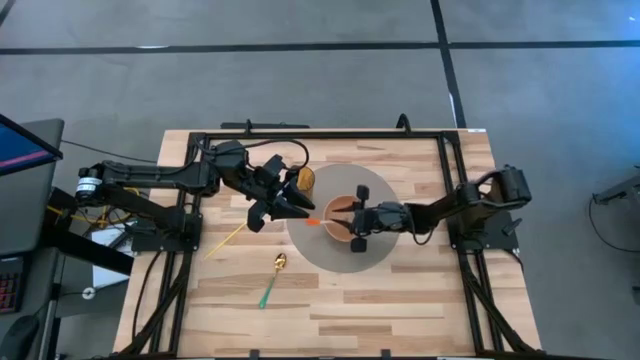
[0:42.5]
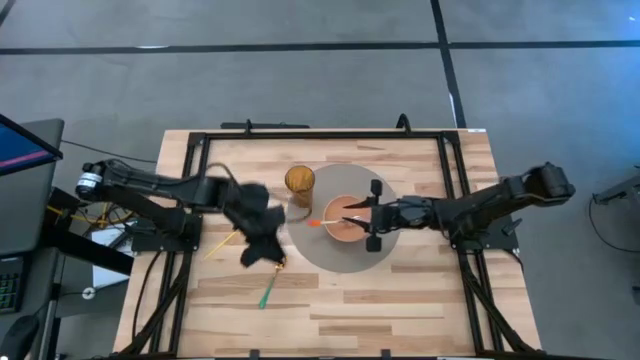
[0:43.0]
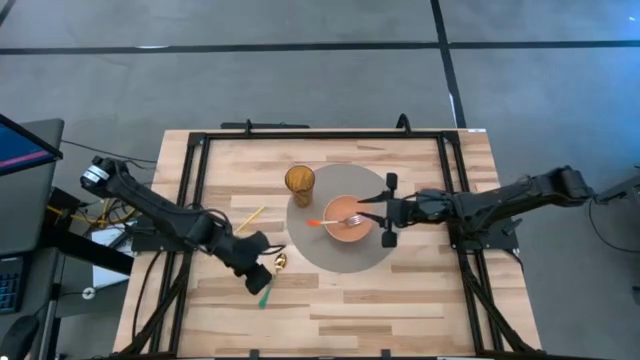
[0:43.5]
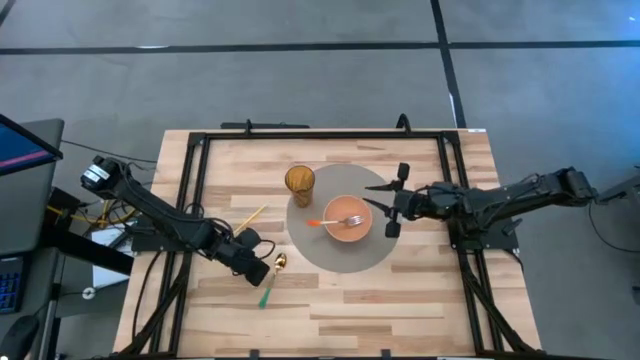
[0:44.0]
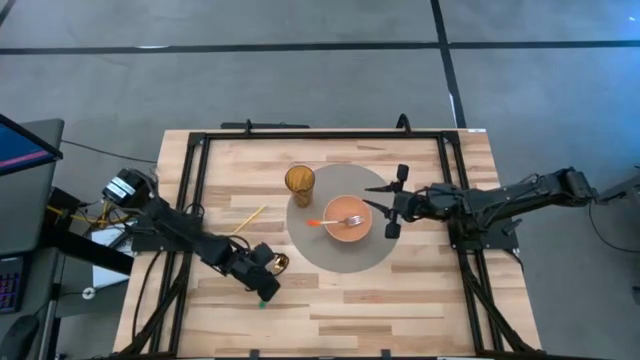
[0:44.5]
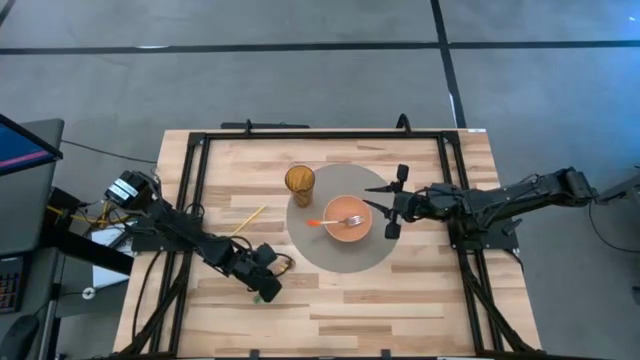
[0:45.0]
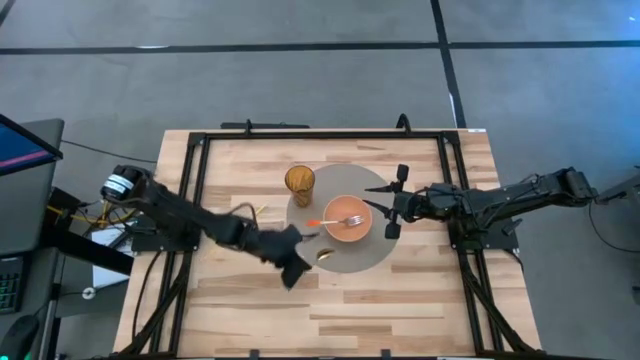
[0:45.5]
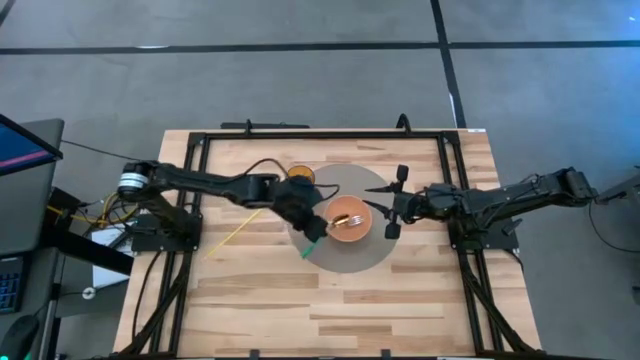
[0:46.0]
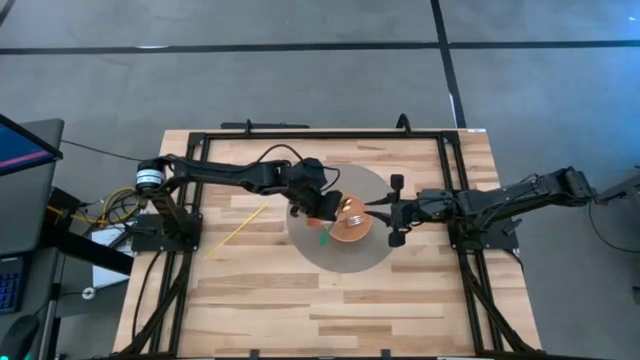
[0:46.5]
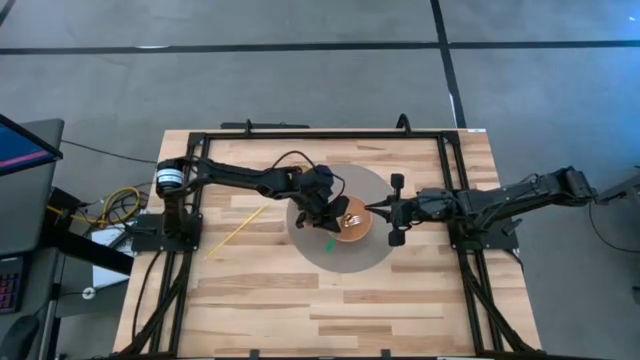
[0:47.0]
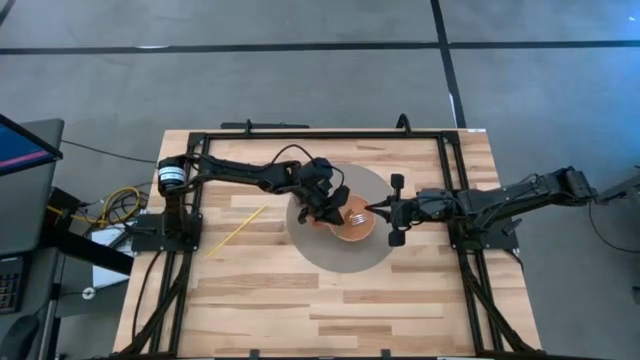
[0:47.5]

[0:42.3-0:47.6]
Task: Pick & Place Utensil
Put the green gold spoon into the light pink bowl

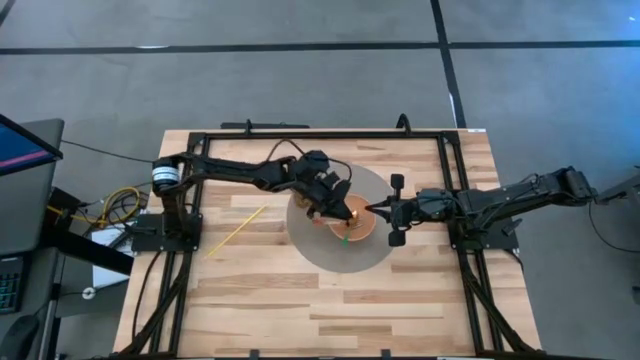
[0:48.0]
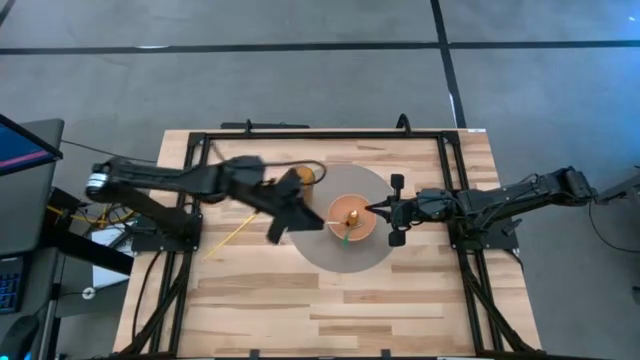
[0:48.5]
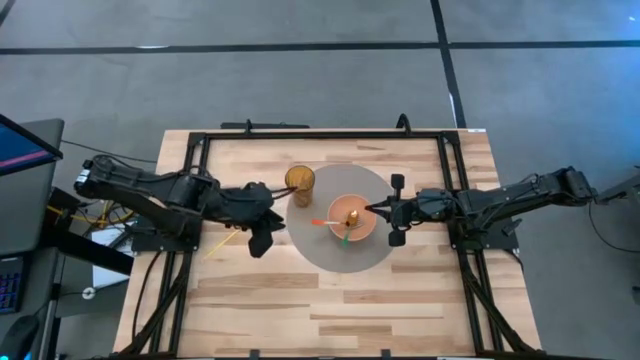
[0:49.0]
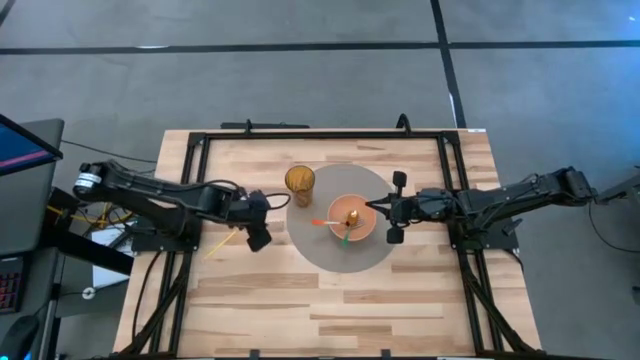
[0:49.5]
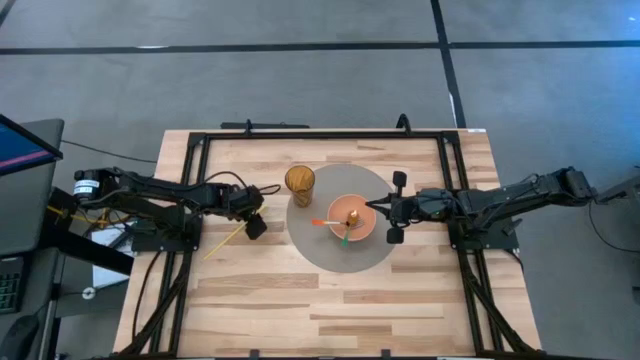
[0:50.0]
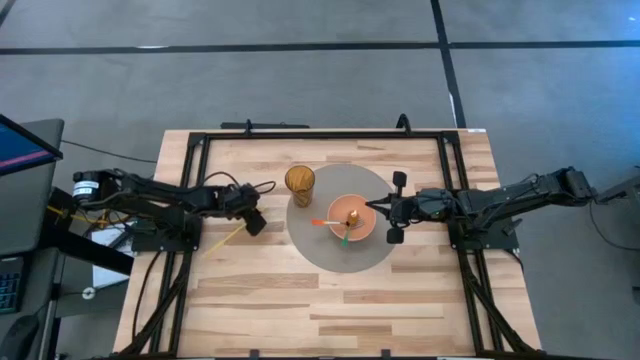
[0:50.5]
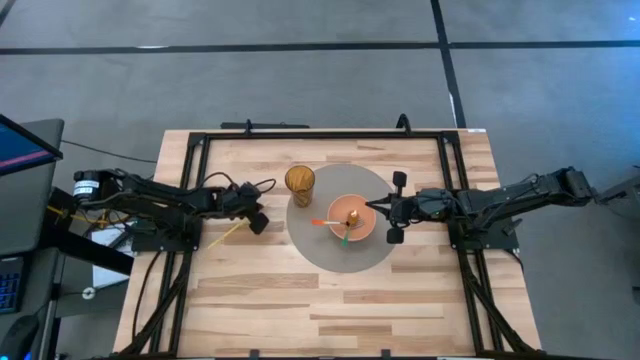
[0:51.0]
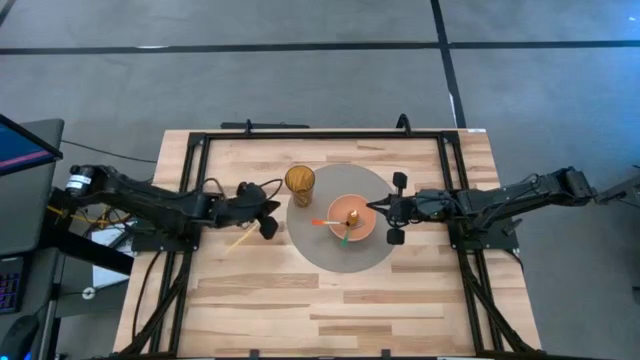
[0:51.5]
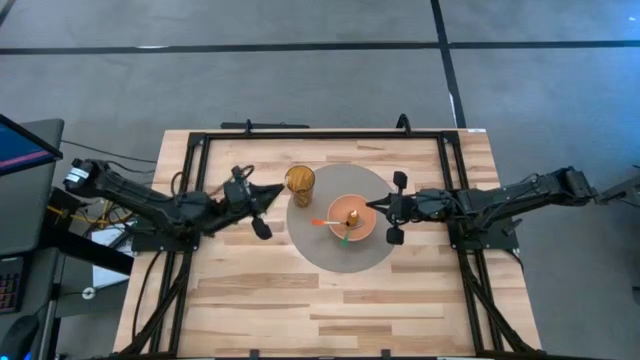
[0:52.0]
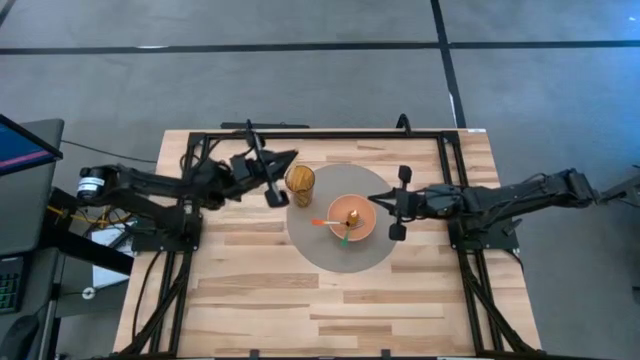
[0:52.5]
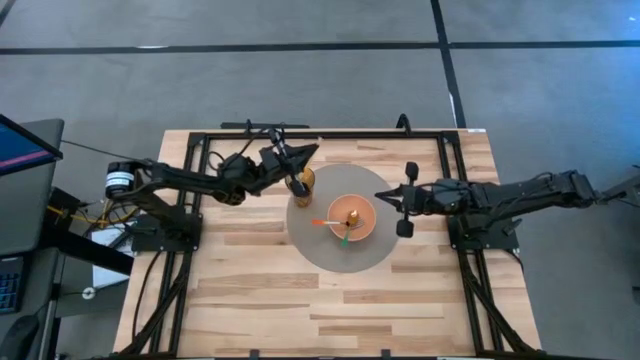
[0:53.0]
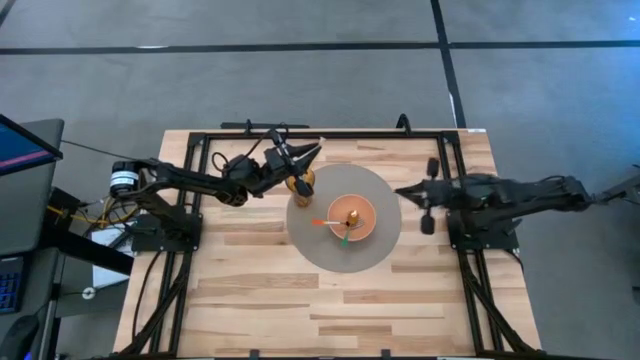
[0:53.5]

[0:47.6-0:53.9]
Put the yellow sipping straw into the brown cup

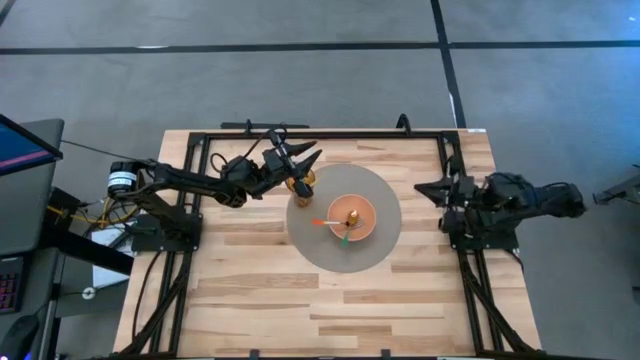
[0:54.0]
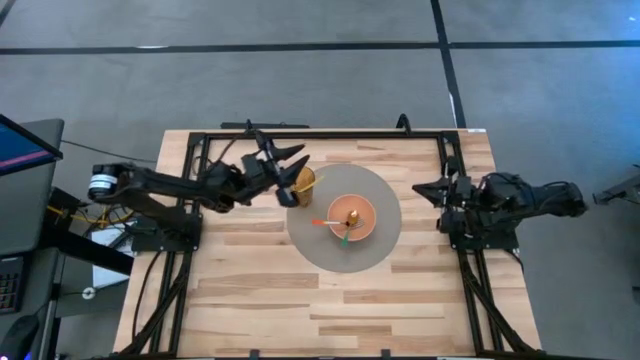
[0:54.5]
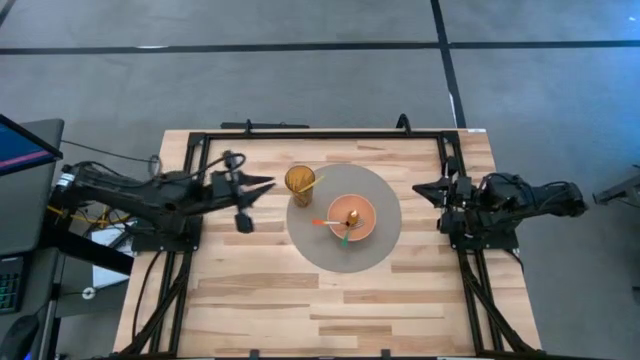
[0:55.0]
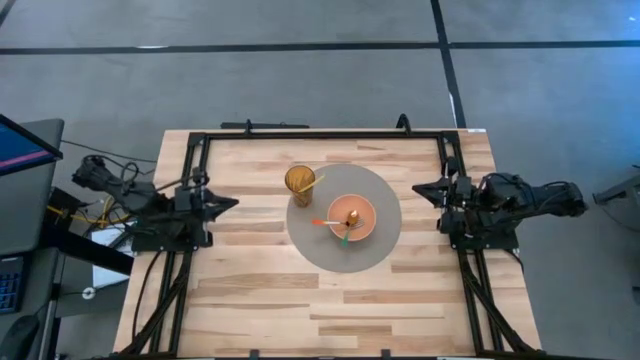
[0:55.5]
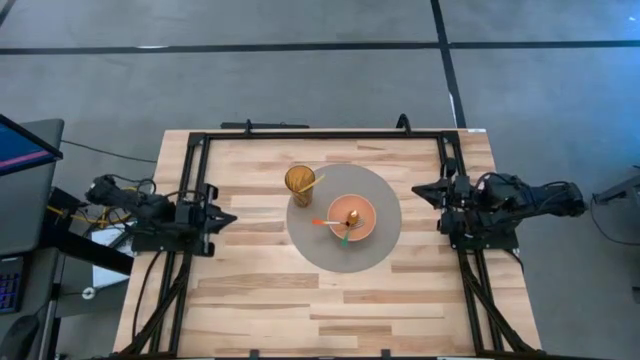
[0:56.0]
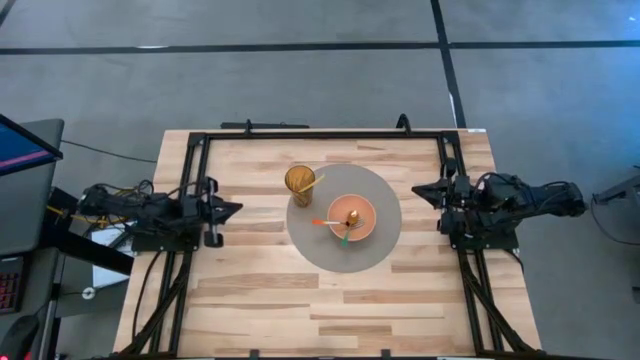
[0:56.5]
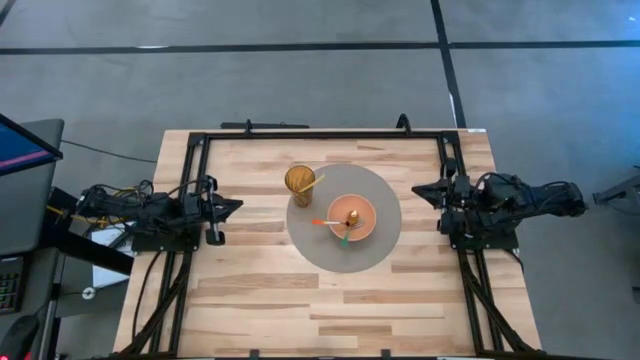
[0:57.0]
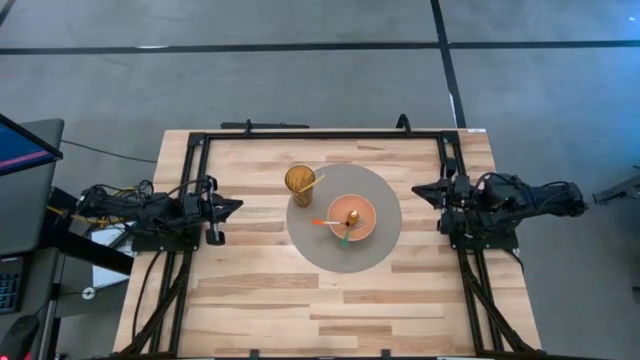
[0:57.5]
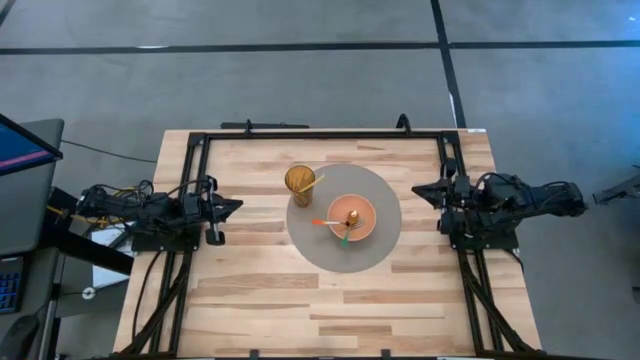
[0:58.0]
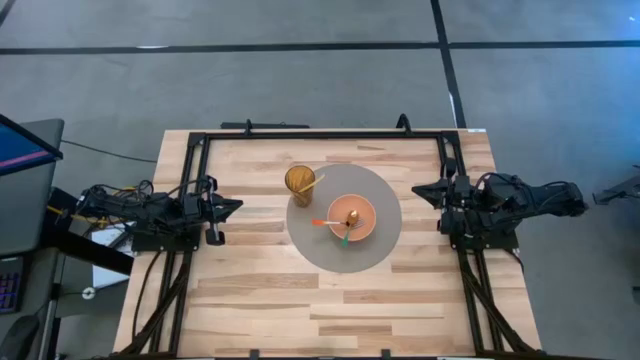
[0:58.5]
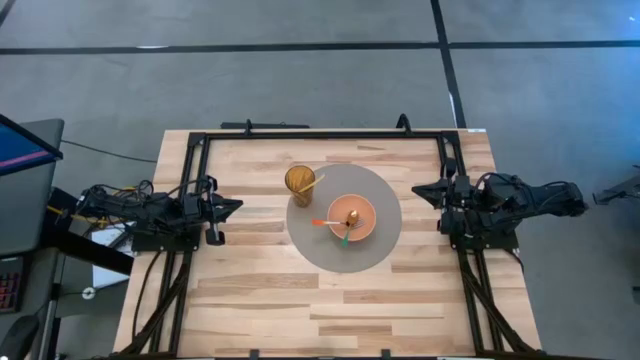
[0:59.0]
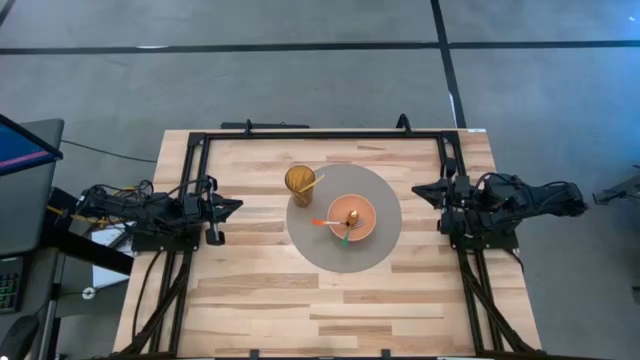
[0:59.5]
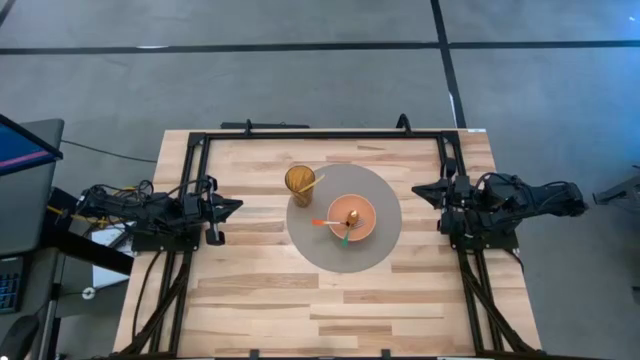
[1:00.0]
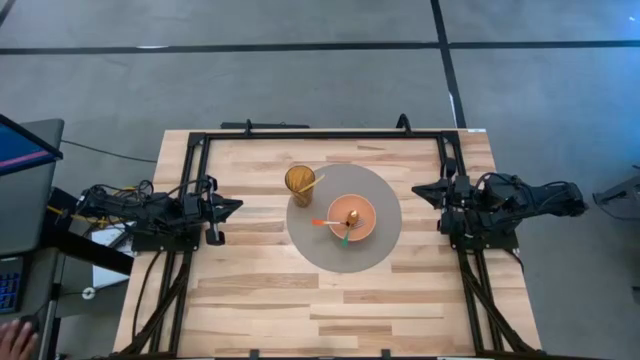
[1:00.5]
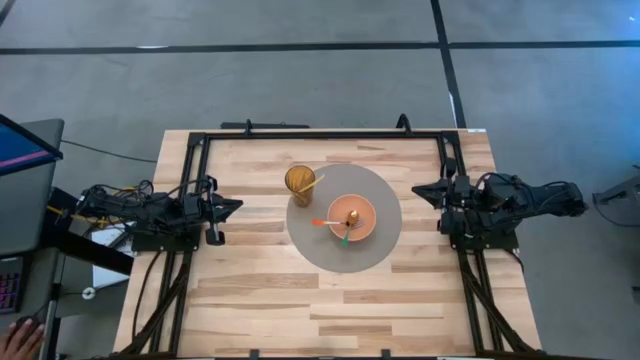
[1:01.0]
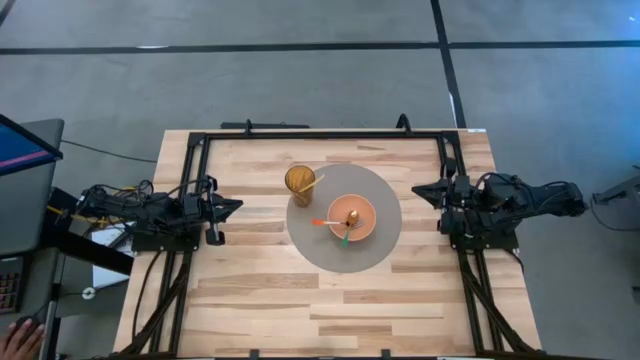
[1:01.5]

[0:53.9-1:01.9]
Return to Home Position

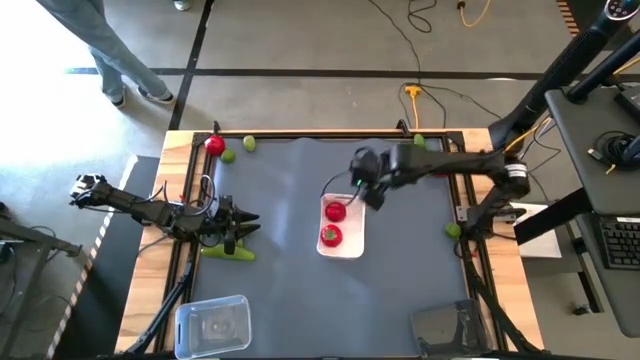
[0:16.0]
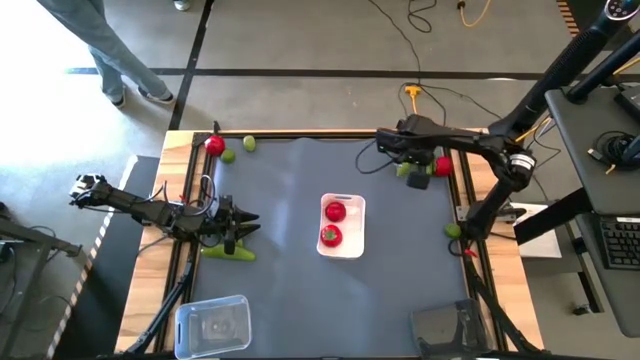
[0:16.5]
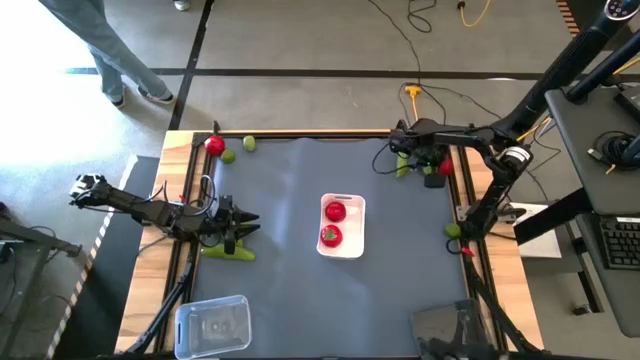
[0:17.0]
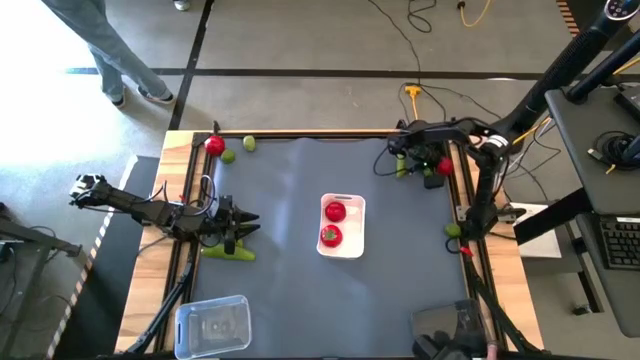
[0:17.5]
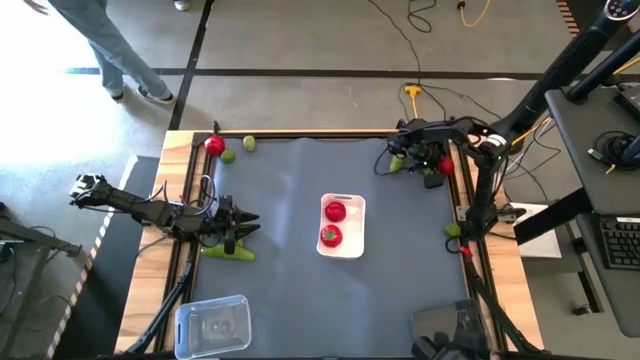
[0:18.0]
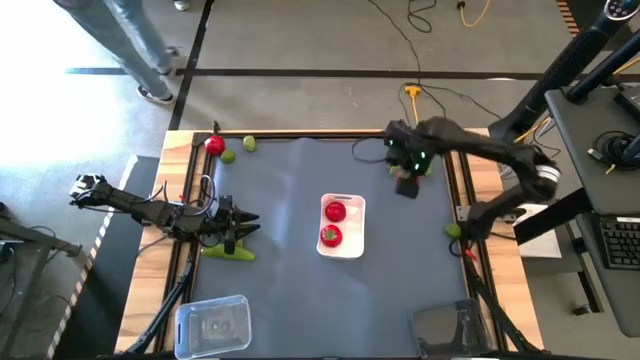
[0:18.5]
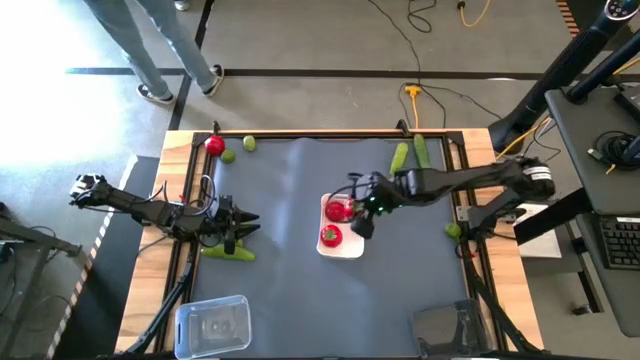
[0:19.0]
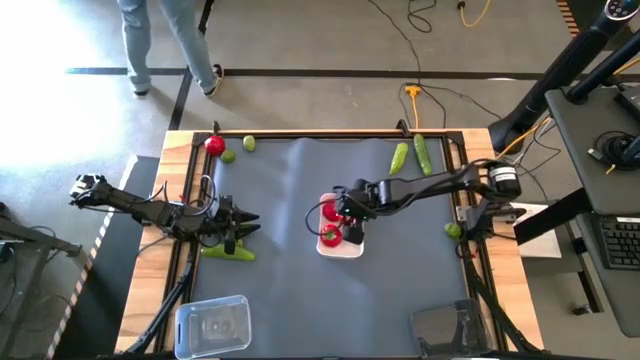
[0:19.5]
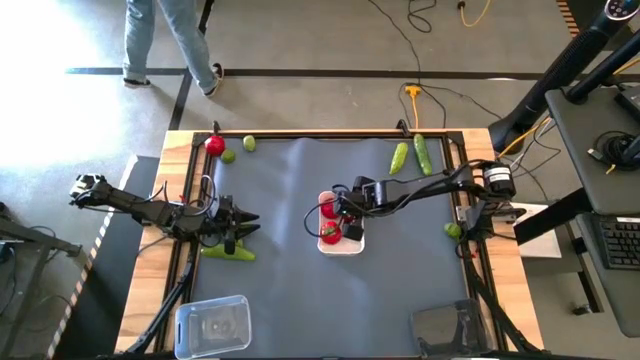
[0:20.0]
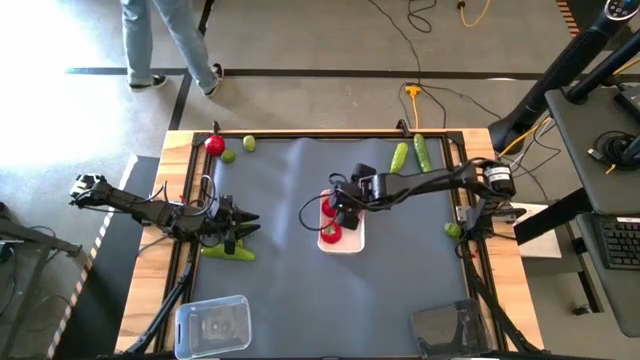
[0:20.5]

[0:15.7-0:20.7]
Task: Sort produce into baskets
Put the right tomato into the white bin
